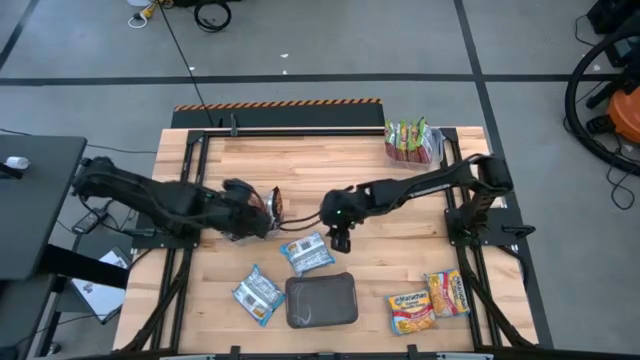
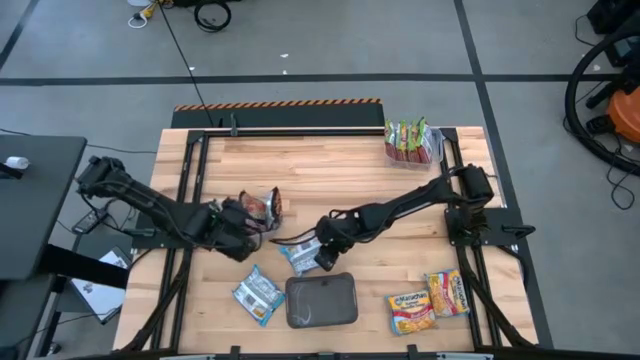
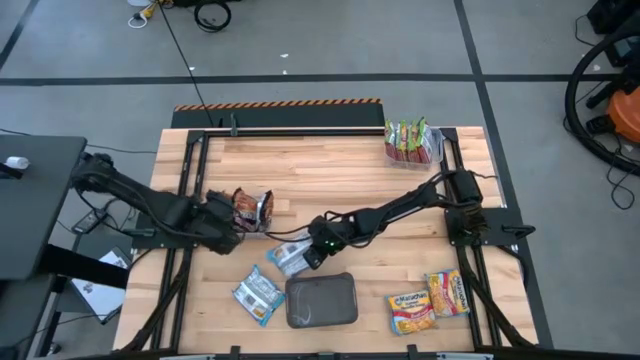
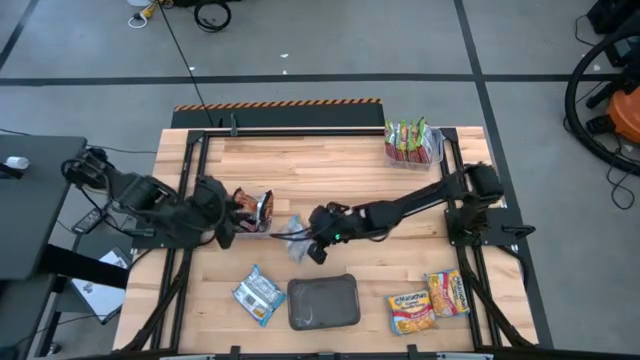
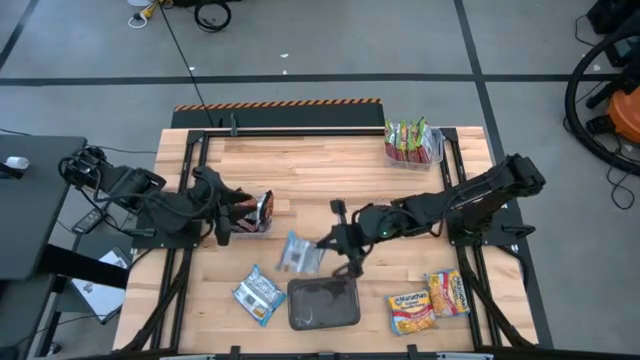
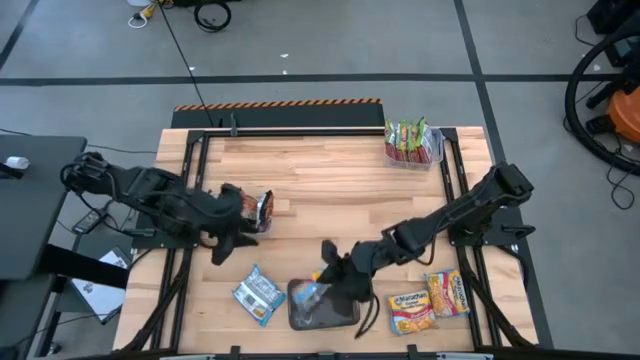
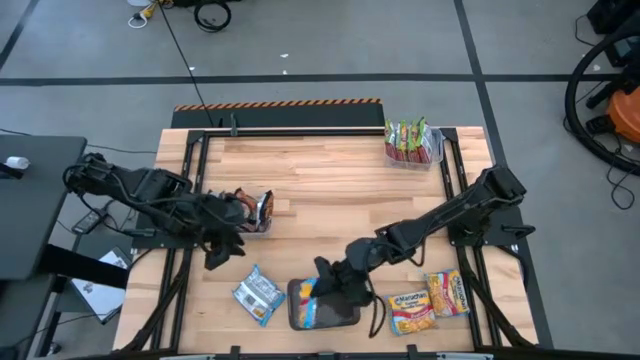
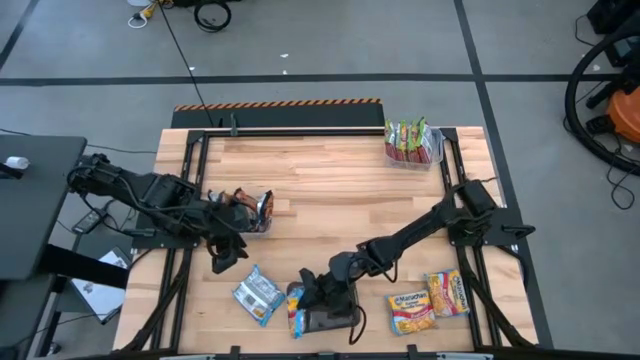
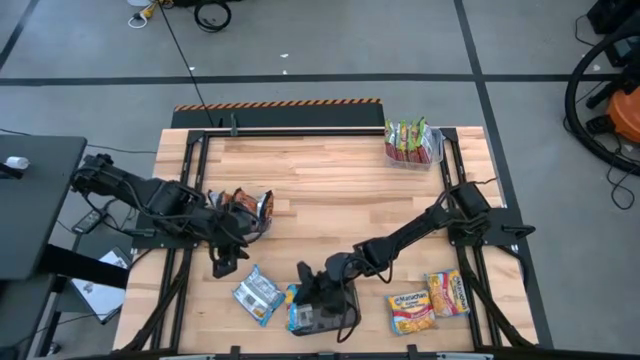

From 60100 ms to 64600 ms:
Task: Sort Maruchan noodles
Put the blue noodle pack into the black bin

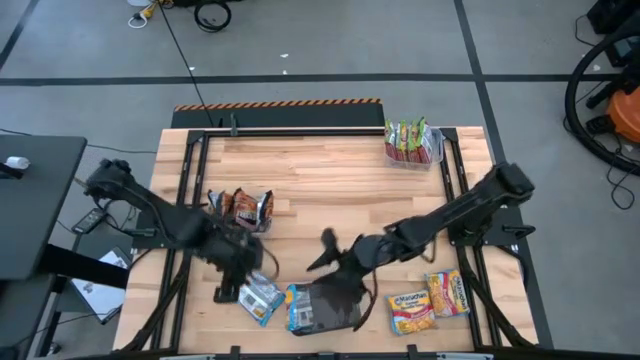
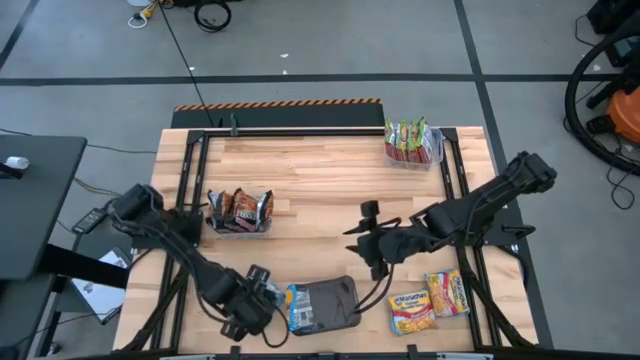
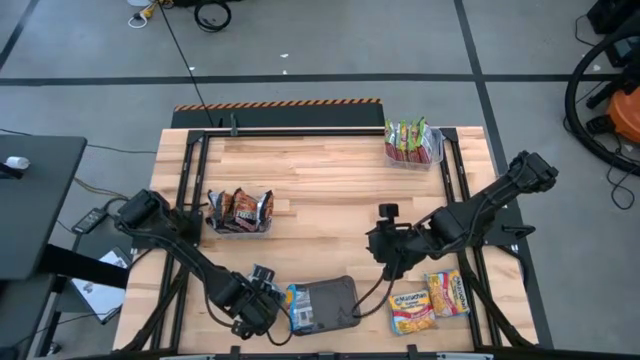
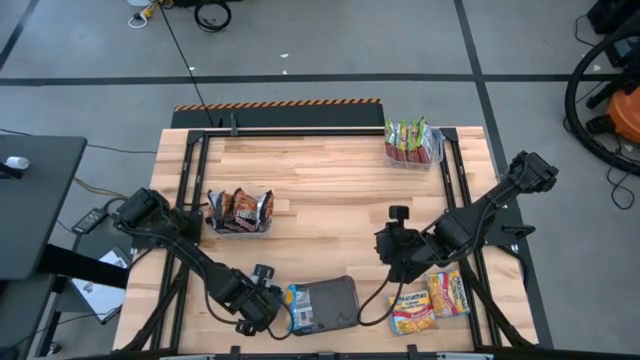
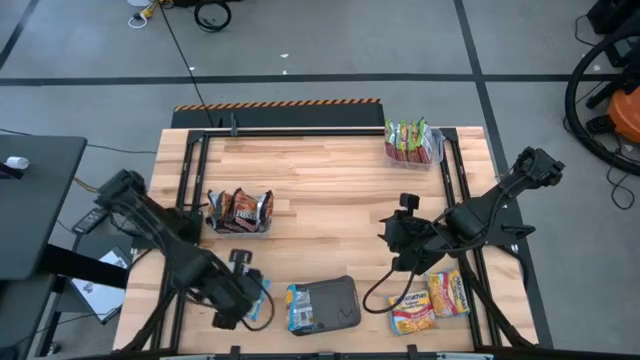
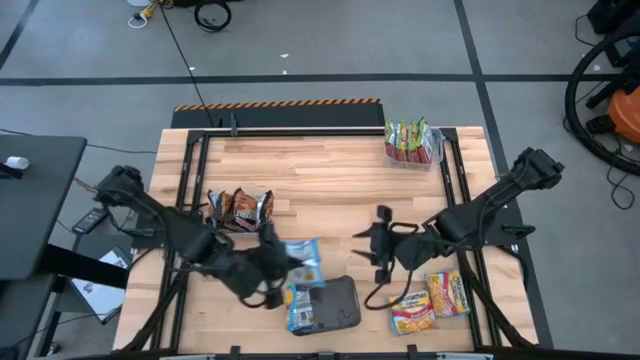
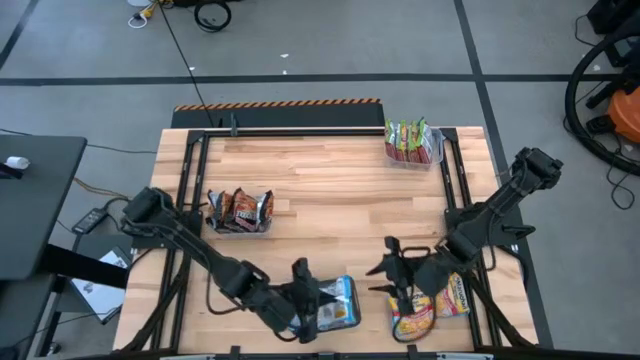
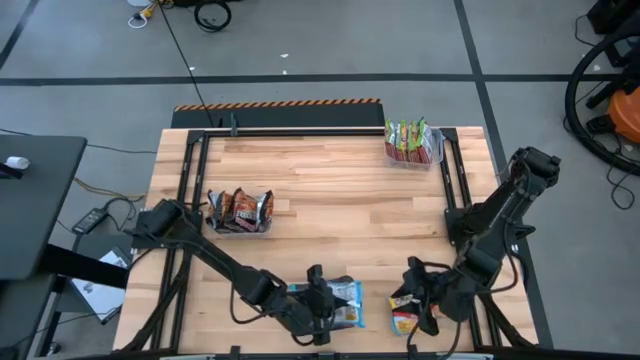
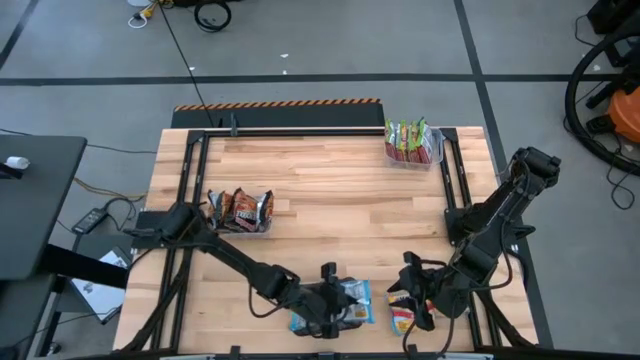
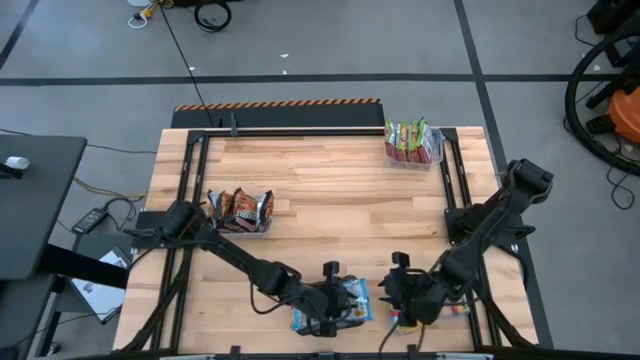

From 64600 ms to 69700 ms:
Put the blue noodle pack into the black bin

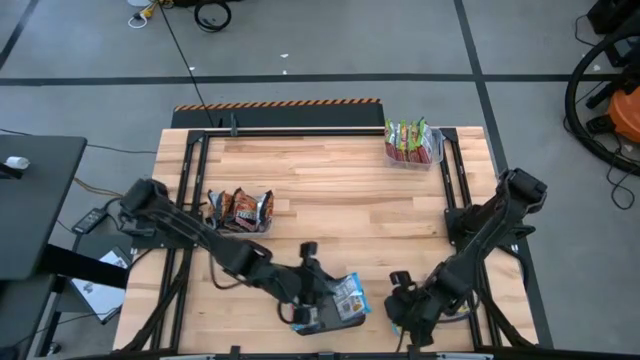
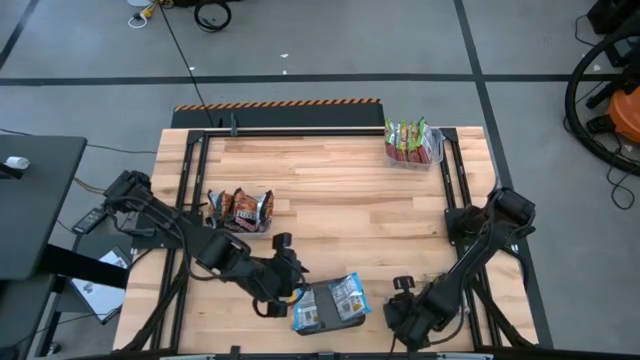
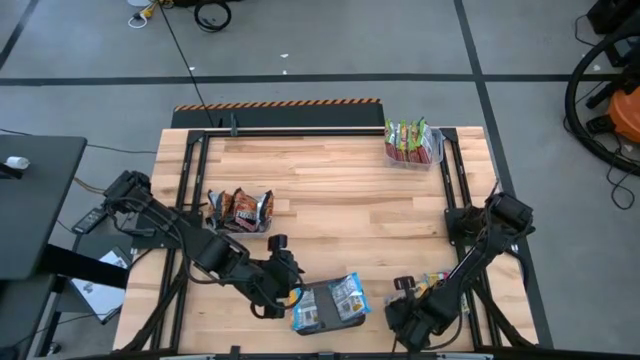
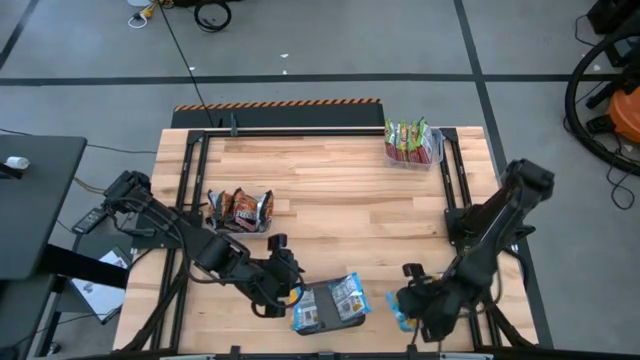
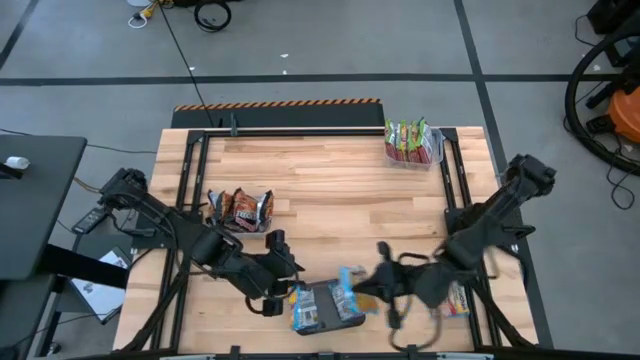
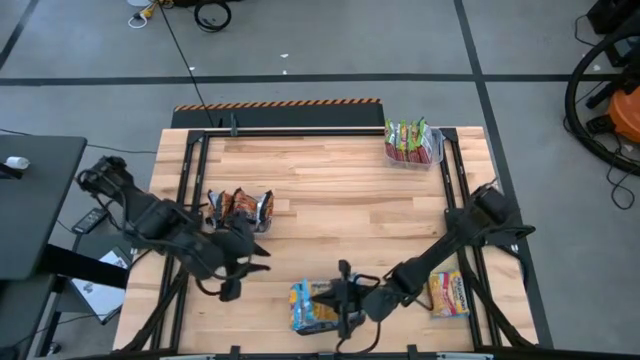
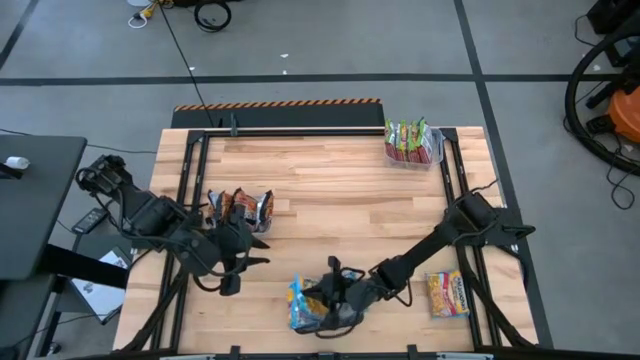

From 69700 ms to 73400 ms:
Put the blue noodle pack into the black bin

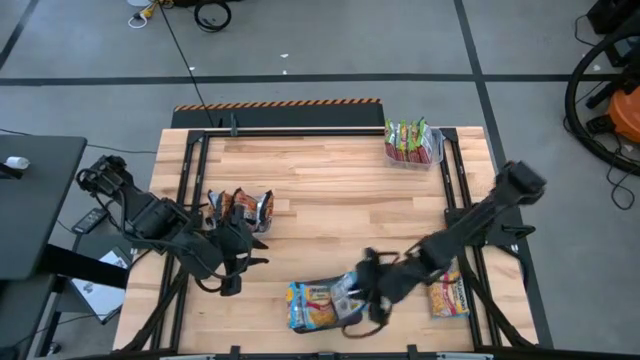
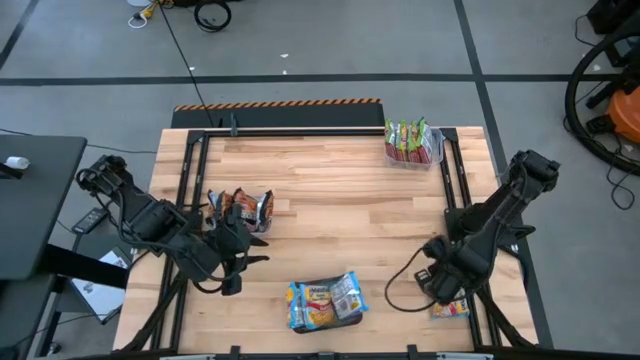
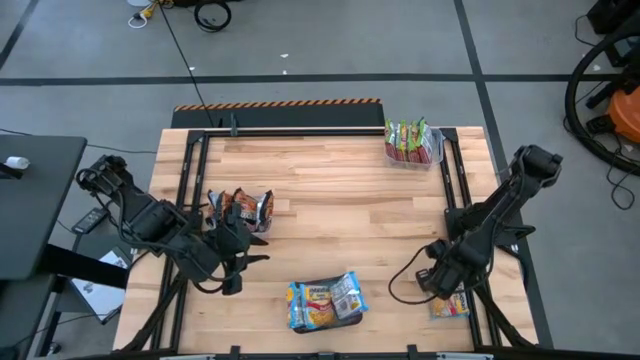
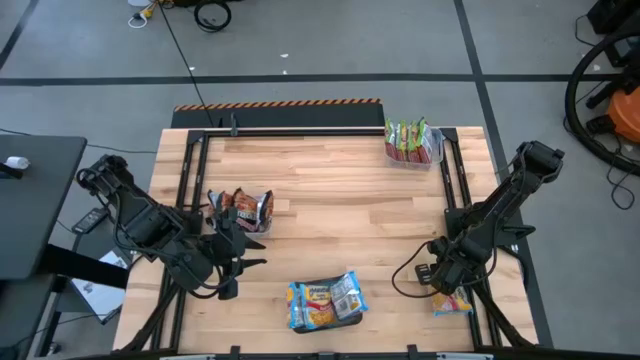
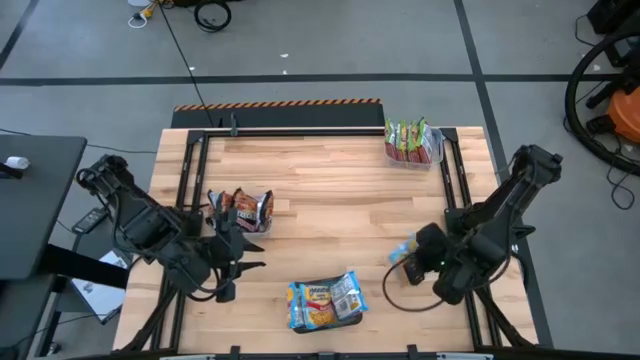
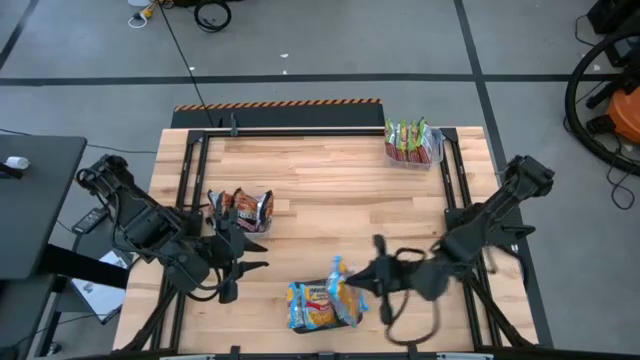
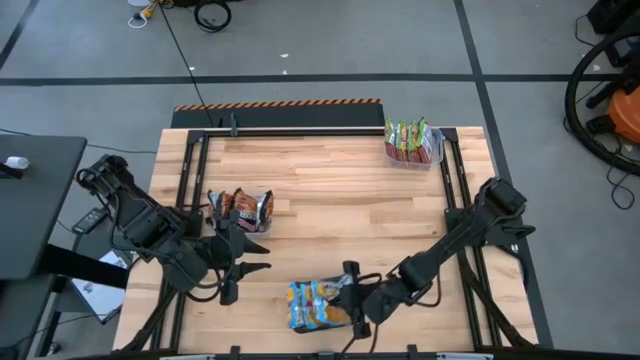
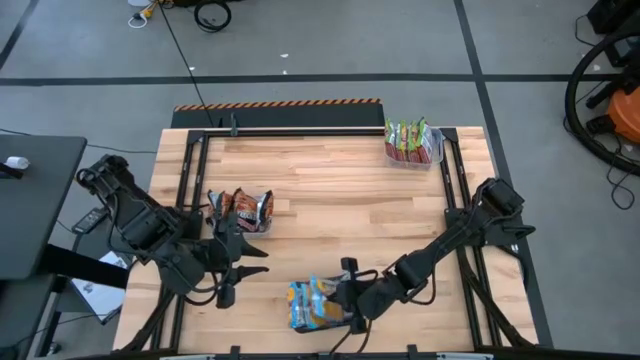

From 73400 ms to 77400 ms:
Put the blue noodle pack into the black bin

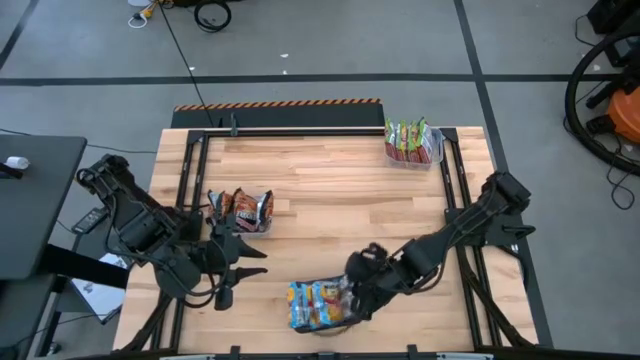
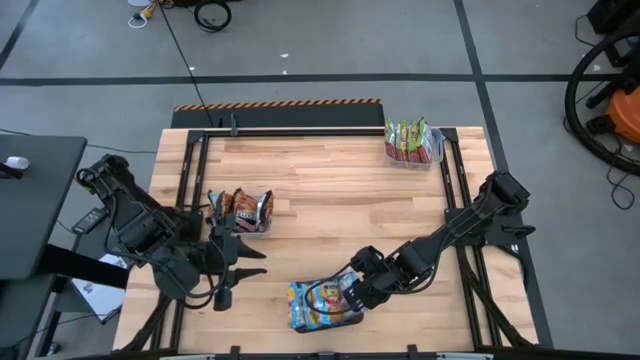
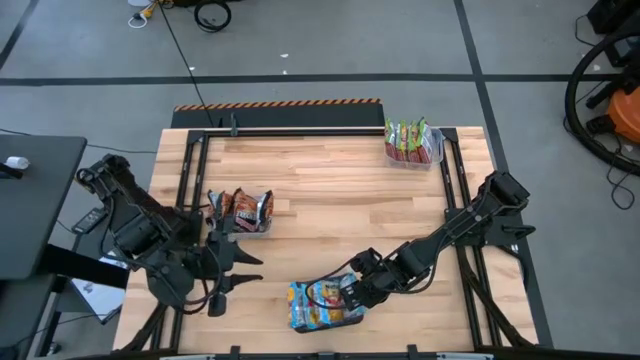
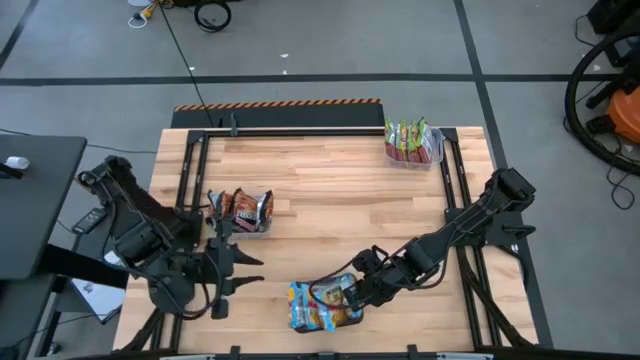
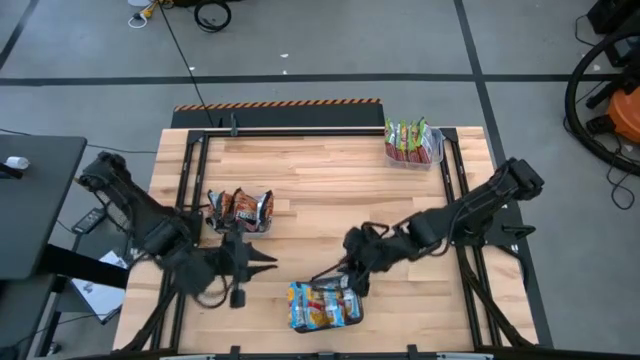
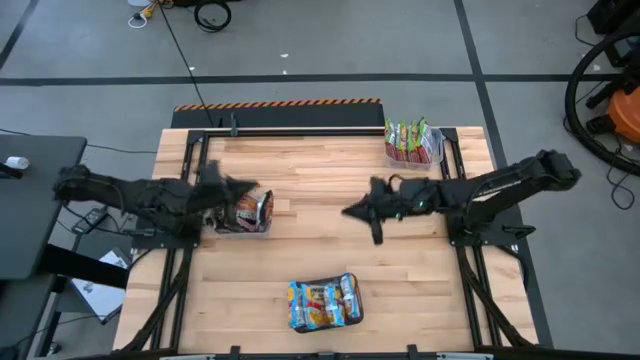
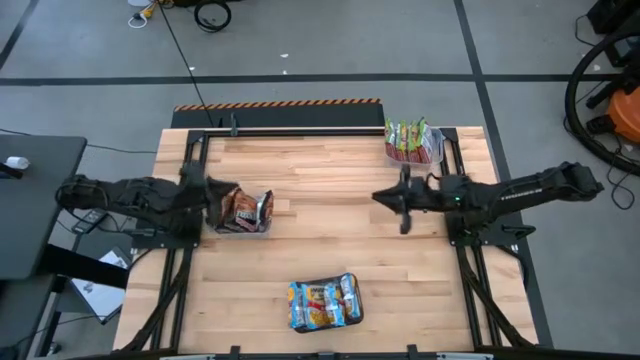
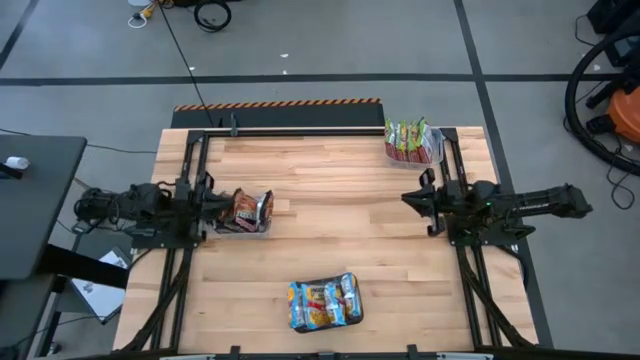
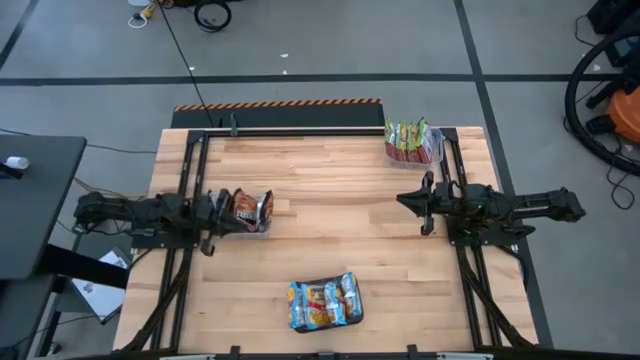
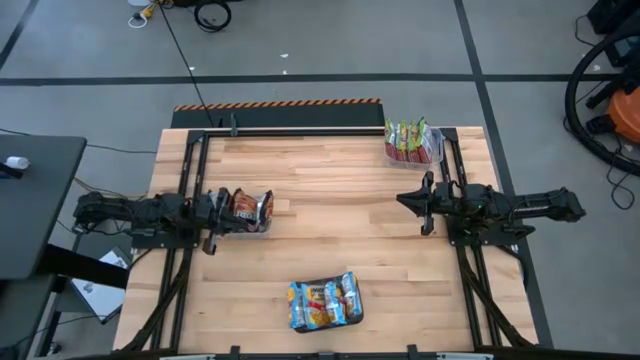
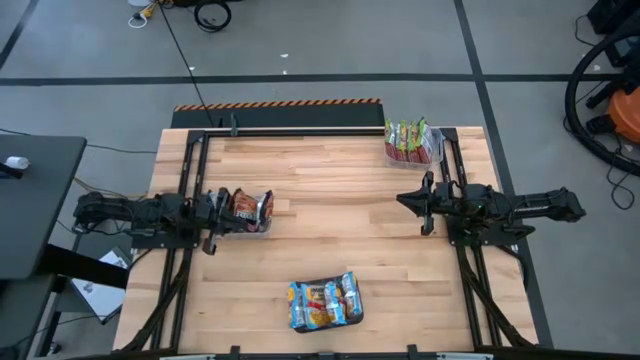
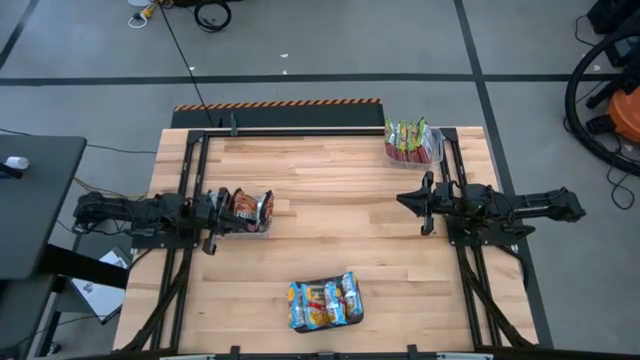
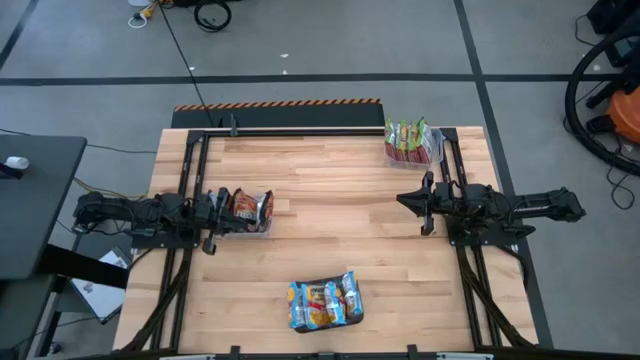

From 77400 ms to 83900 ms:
Return to Home Position
